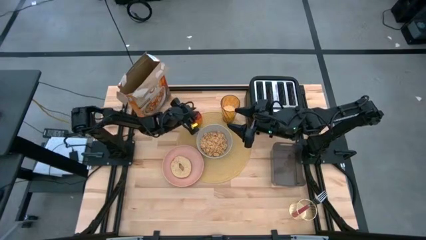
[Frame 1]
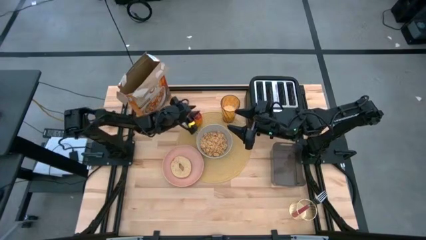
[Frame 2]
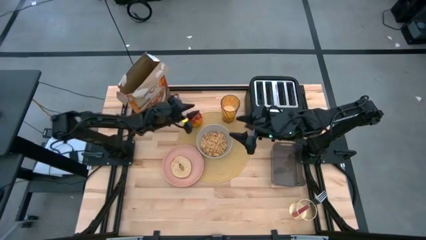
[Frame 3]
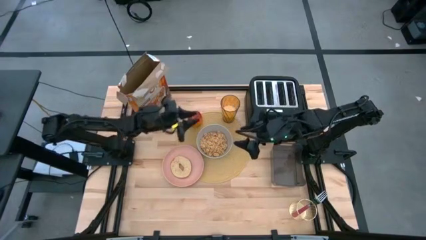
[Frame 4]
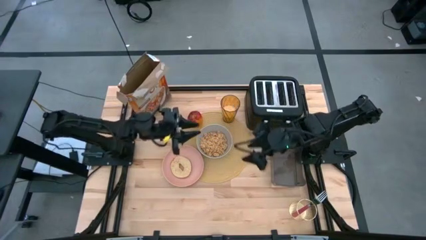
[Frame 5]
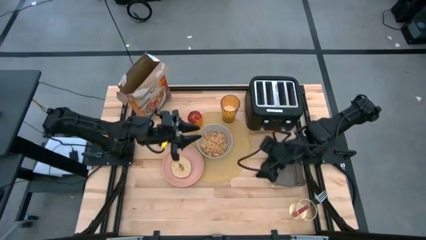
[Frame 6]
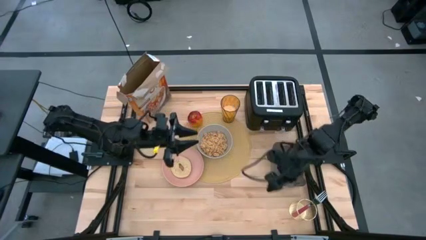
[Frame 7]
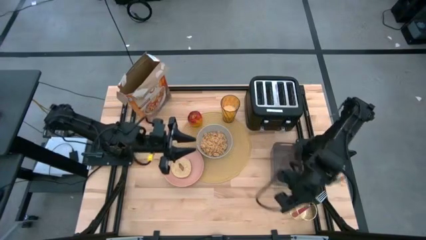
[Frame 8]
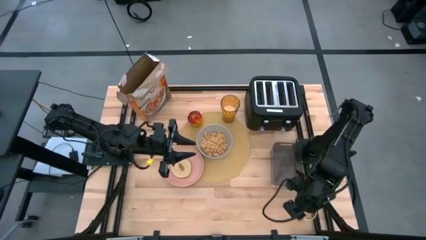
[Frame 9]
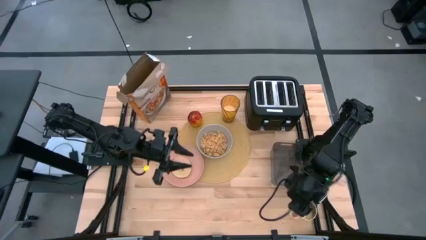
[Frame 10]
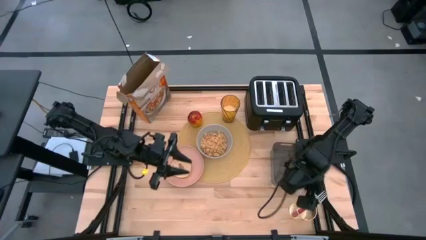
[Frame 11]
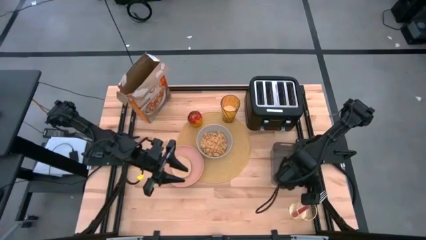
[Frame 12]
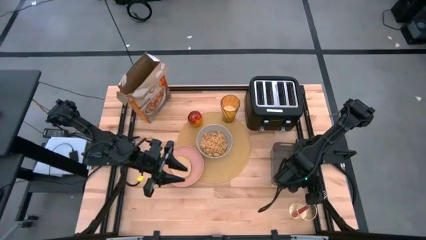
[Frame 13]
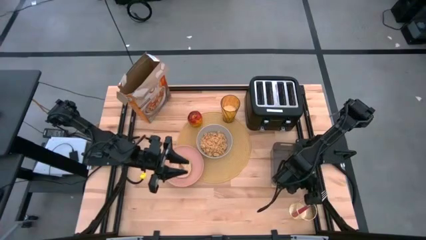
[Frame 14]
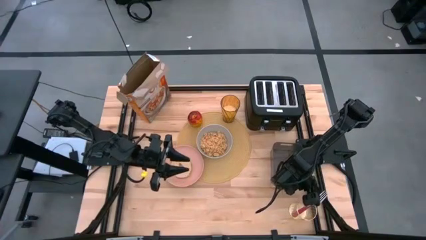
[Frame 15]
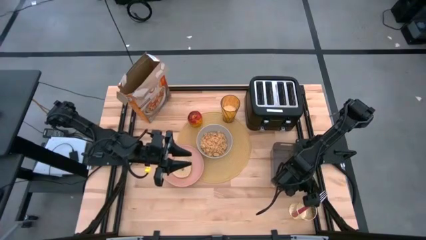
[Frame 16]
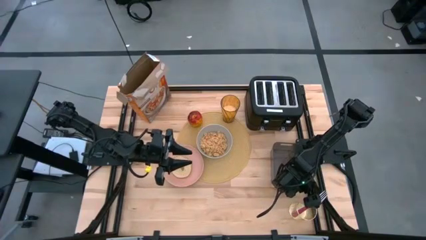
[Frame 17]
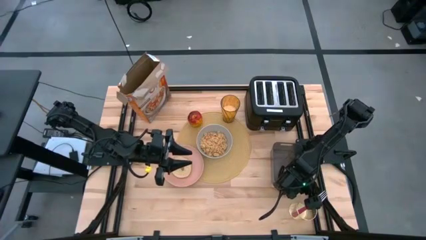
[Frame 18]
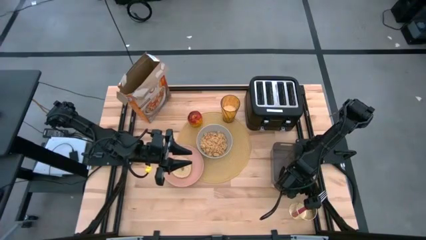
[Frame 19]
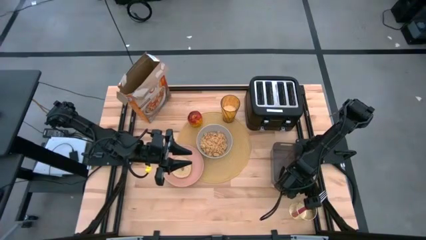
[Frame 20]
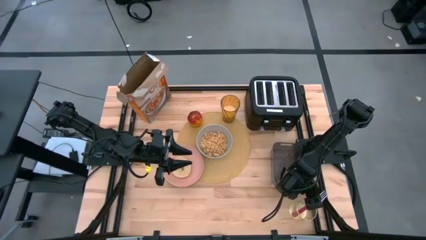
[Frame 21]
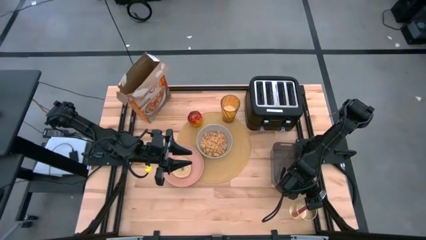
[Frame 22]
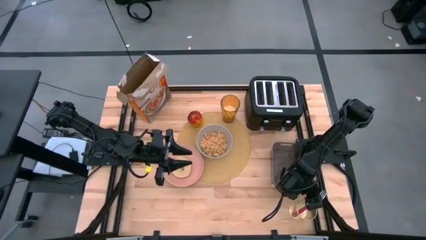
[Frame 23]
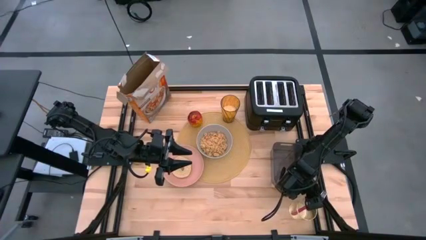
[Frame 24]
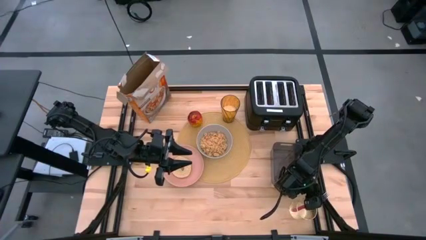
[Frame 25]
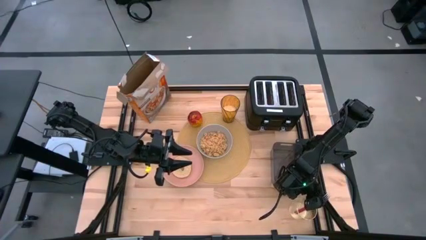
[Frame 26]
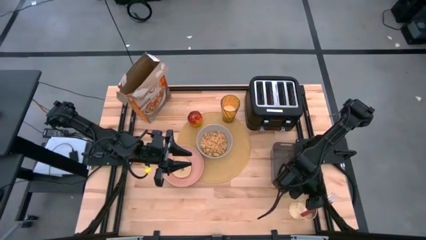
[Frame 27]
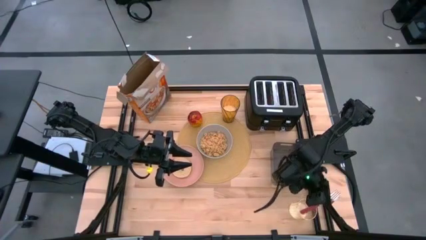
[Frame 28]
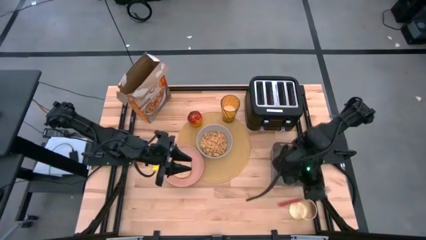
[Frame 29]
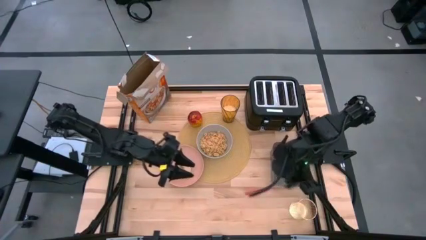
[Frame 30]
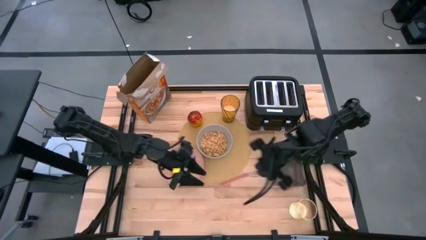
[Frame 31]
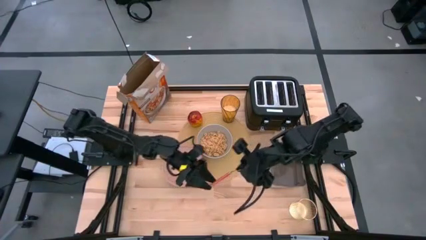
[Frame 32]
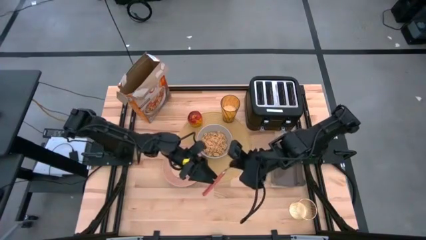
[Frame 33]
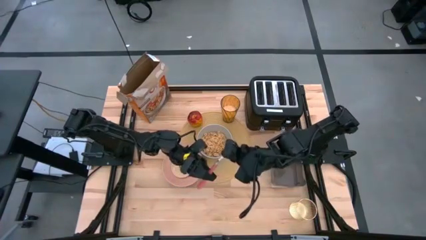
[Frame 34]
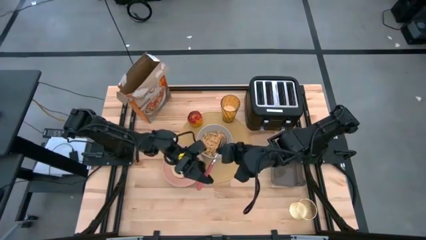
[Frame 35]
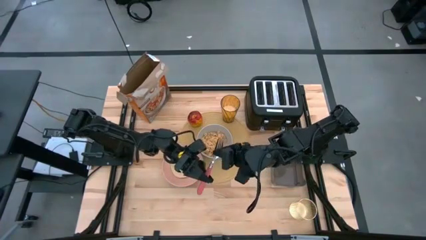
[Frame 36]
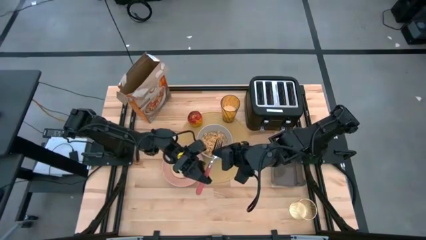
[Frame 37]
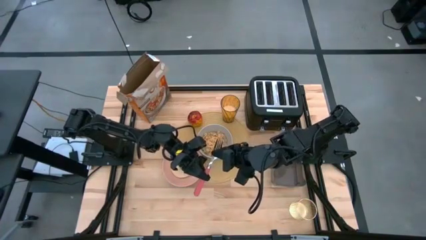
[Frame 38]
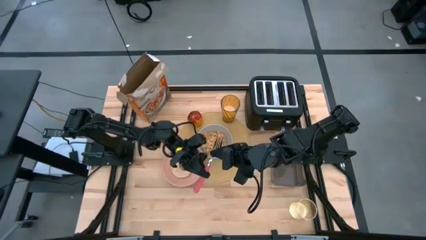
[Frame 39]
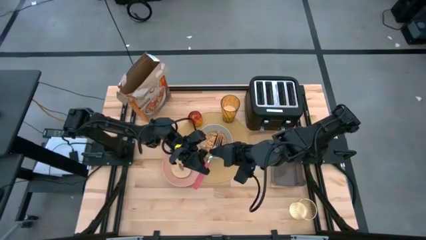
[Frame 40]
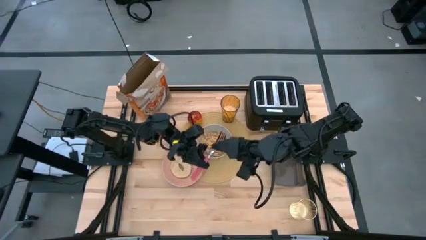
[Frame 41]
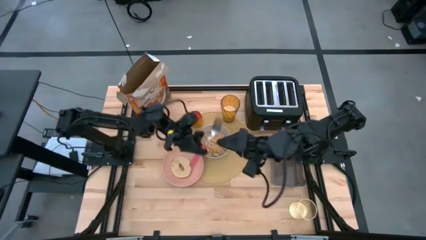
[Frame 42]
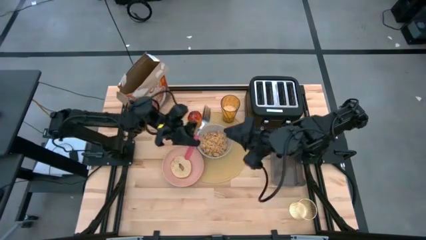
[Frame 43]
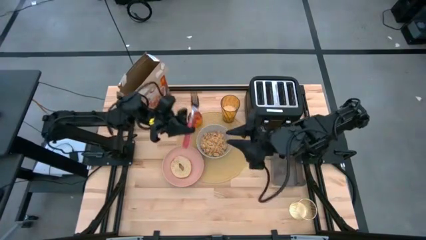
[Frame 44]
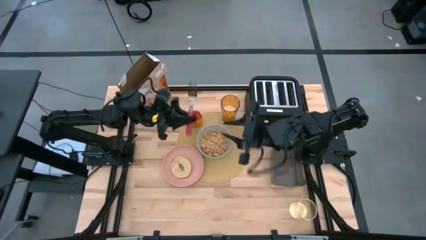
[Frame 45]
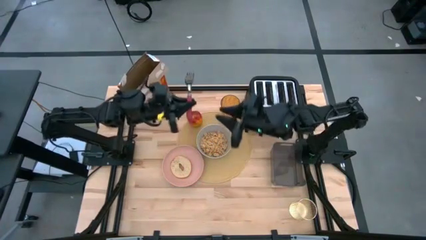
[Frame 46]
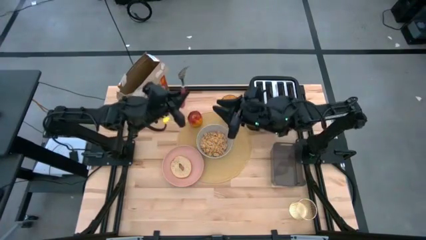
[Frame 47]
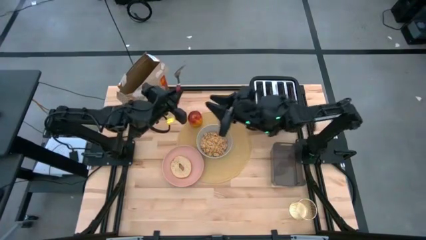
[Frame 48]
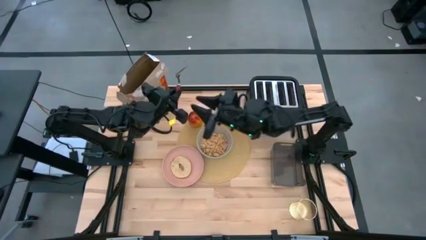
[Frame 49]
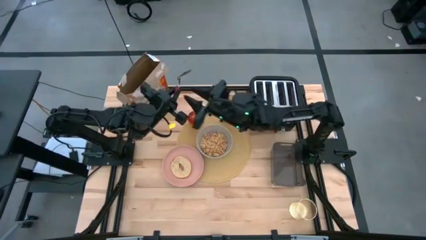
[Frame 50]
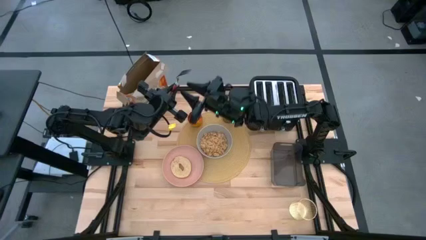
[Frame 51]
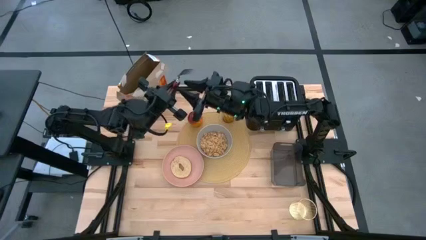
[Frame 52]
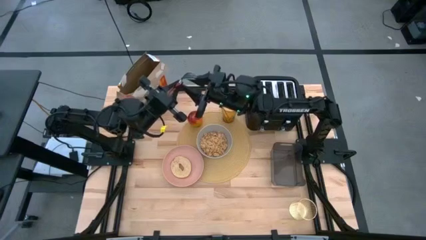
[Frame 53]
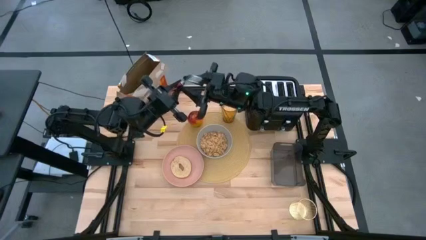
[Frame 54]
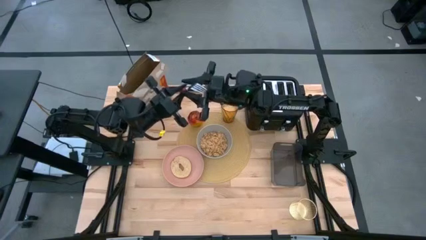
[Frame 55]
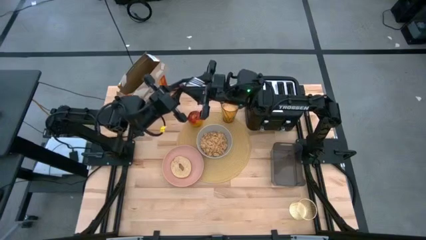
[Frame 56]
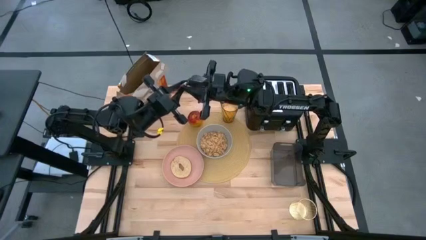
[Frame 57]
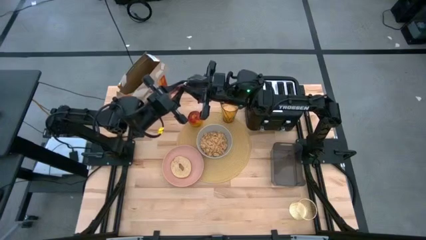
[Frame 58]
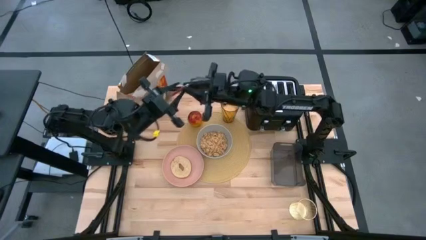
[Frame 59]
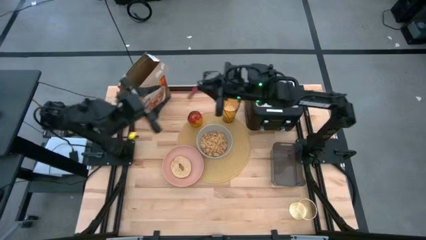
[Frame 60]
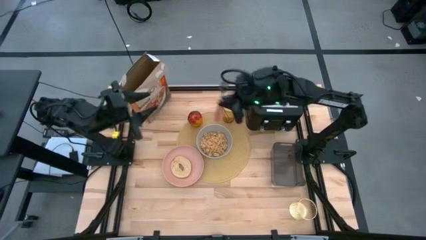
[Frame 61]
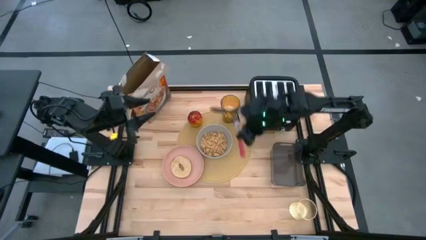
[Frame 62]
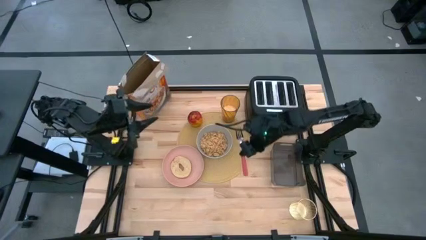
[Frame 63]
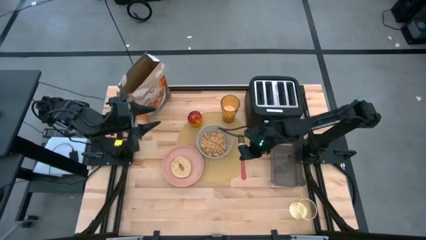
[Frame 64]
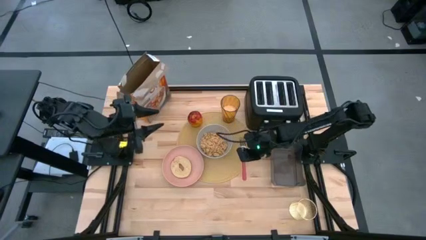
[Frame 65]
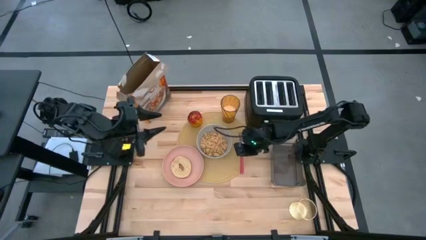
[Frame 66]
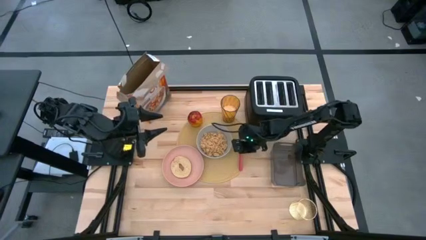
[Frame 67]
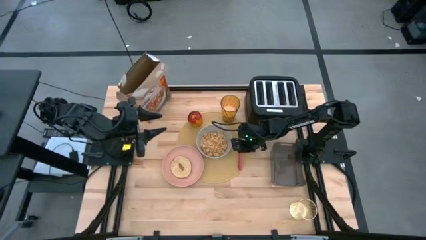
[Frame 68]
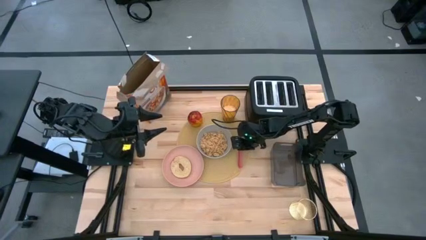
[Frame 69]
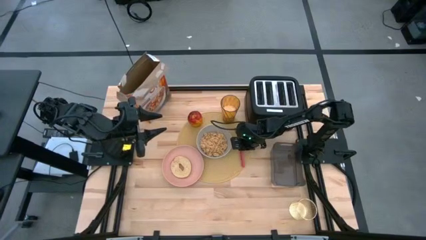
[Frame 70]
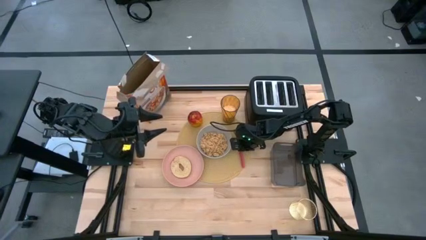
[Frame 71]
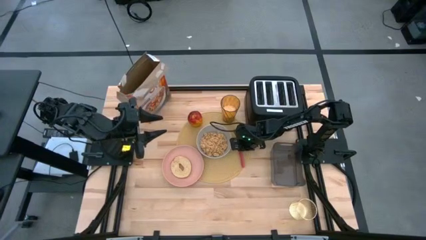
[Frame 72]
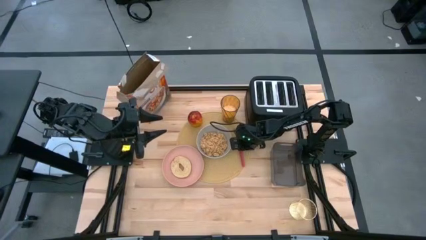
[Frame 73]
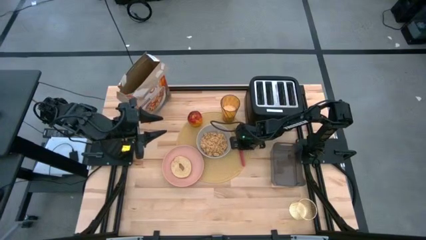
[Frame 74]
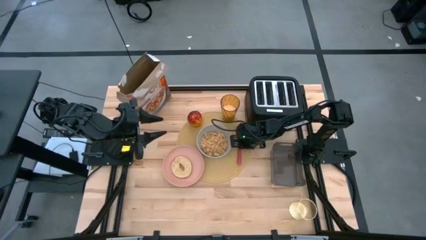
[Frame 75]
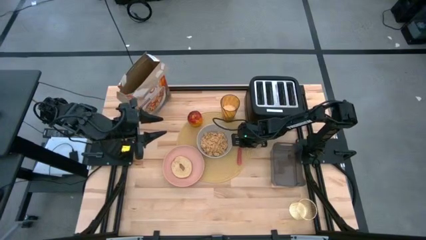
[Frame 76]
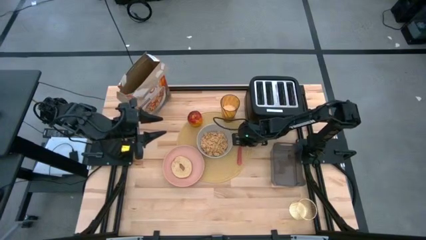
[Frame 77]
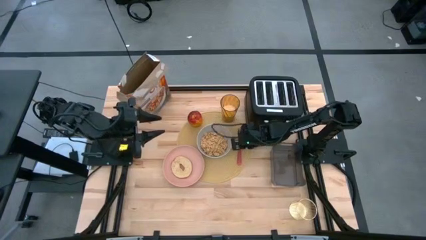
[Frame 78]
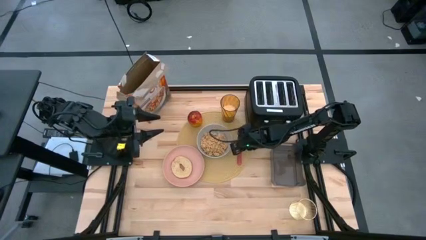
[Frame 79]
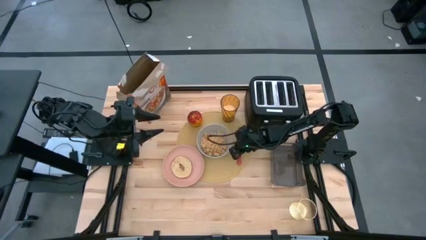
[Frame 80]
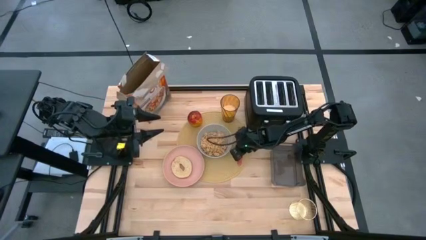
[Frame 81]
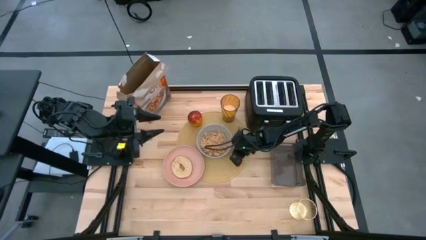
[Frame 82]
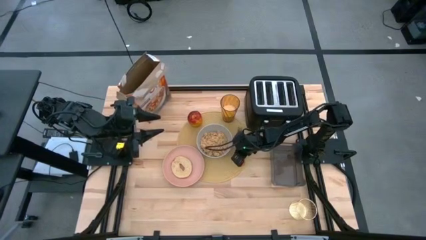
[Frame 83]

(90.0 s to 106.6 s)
Task: Arrange a breakfast setting
Put the red fork on the brown place mat beside the gray bowl

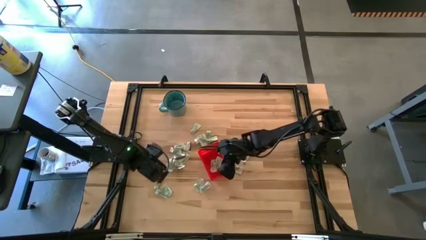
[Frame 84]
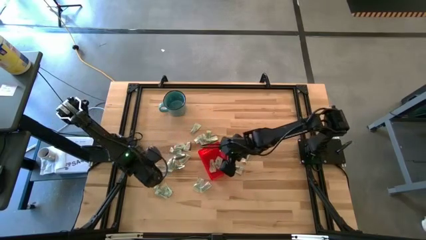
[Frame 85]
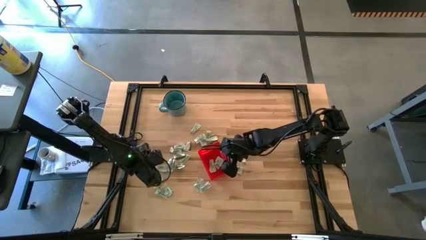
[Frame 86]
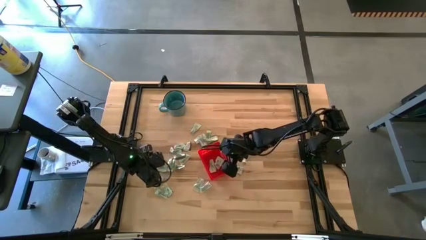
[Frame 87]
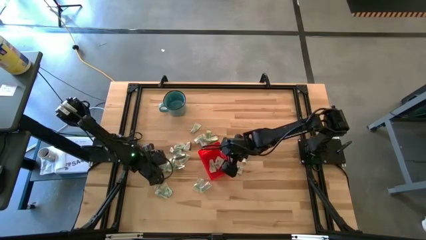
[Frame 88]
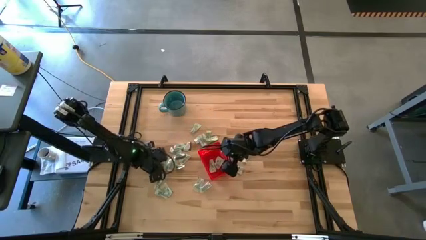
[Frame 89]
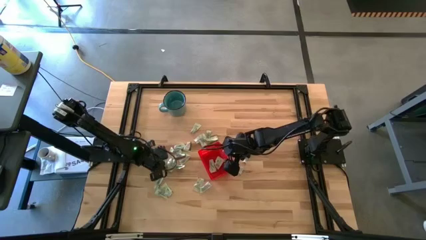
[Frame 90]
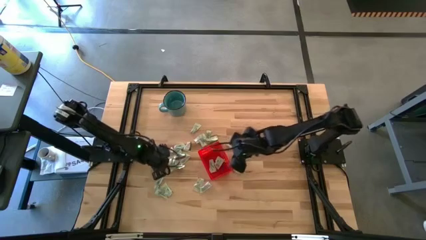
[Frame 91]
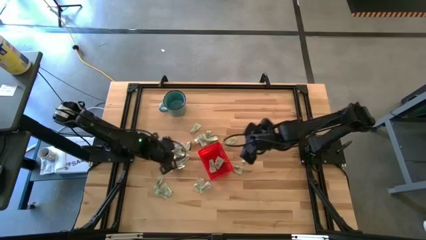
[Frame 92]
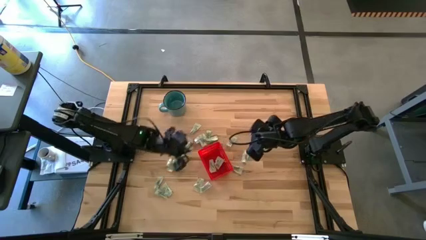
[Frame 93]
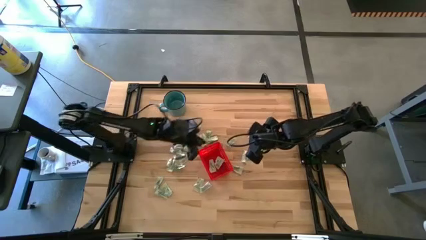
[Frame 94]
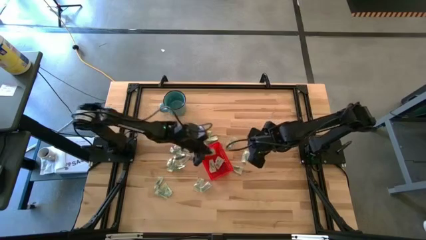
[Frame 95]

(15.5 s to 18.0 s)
Task: Pick and place Stevia / Truvia into bins
Put the white stevia packet into the basket
